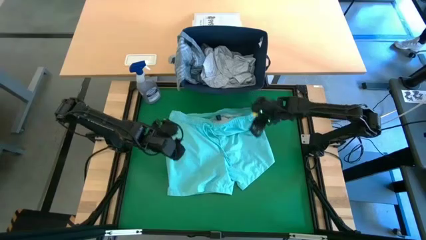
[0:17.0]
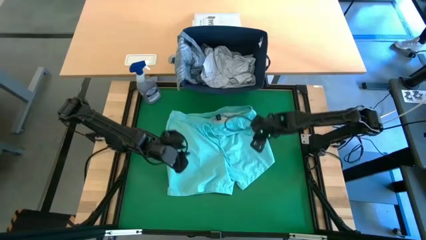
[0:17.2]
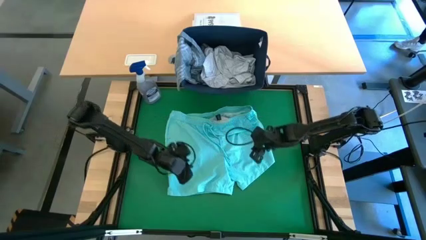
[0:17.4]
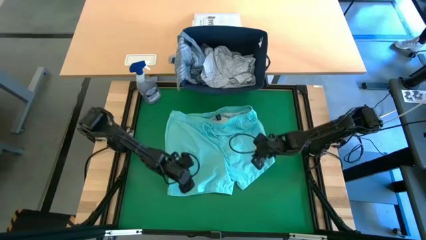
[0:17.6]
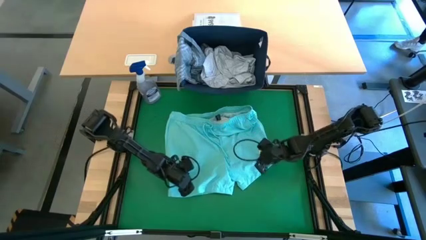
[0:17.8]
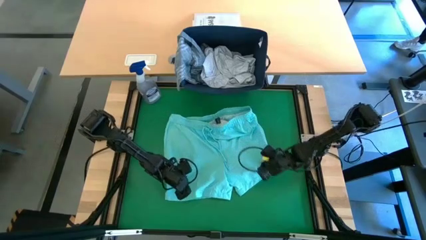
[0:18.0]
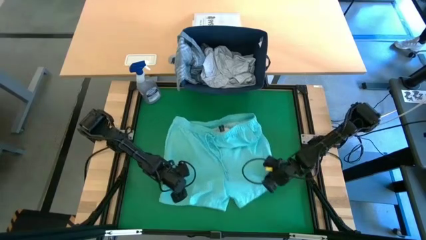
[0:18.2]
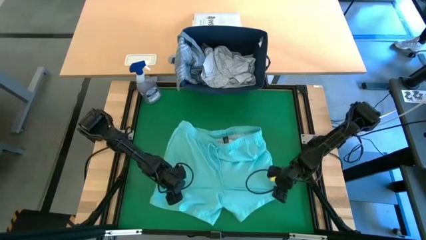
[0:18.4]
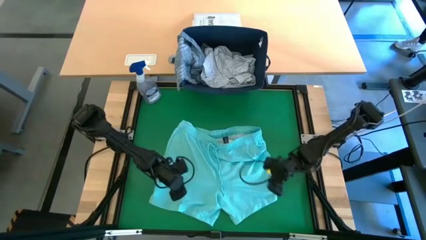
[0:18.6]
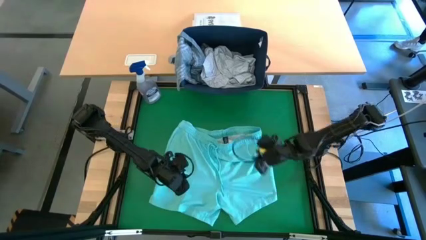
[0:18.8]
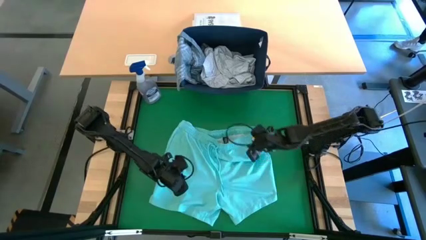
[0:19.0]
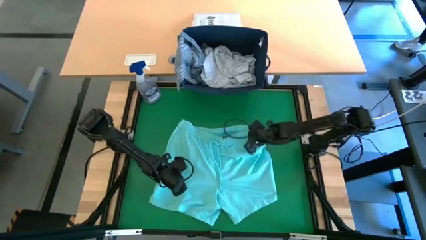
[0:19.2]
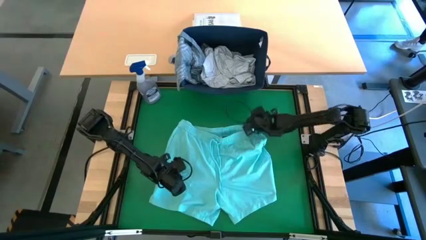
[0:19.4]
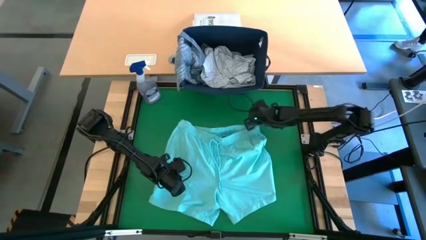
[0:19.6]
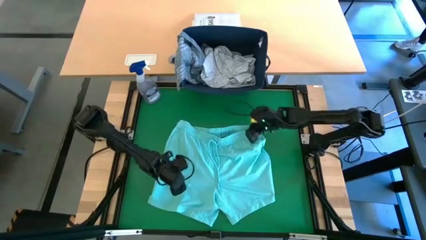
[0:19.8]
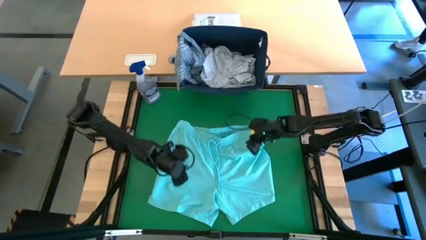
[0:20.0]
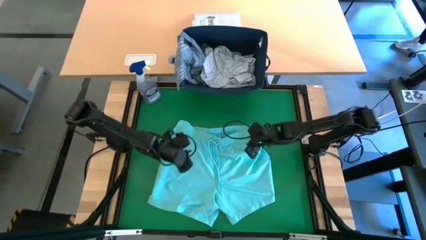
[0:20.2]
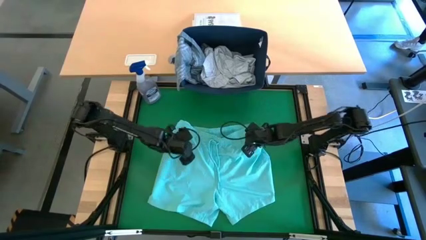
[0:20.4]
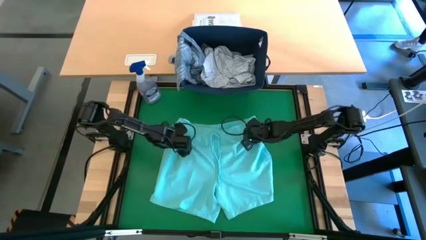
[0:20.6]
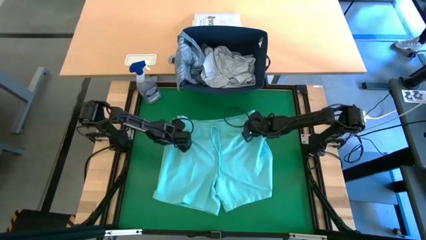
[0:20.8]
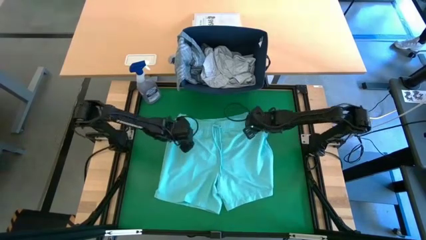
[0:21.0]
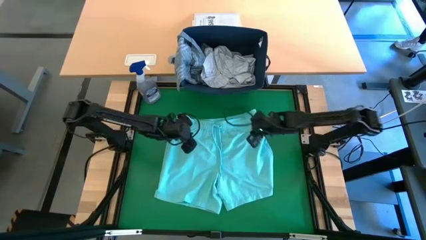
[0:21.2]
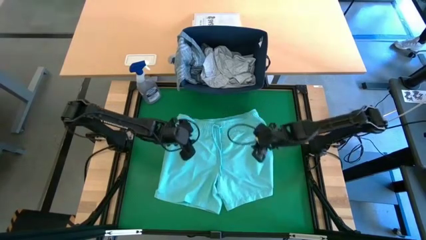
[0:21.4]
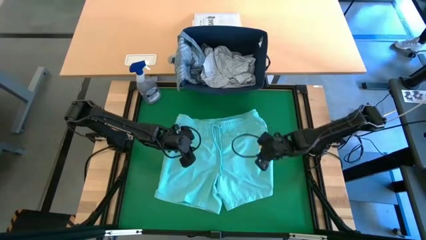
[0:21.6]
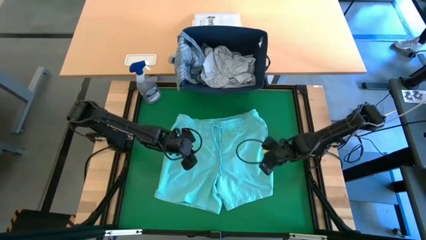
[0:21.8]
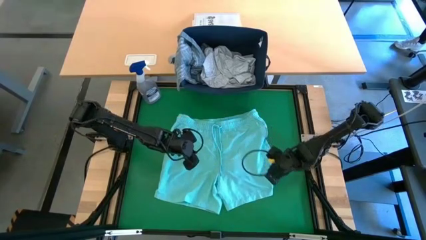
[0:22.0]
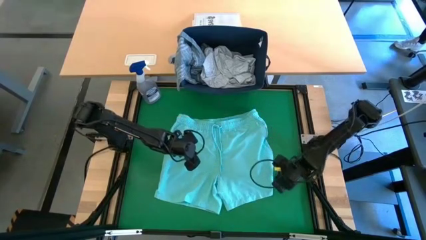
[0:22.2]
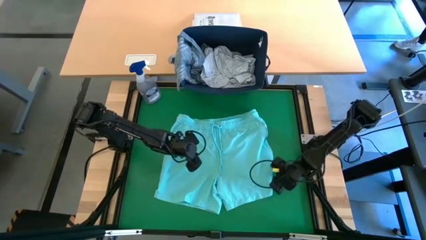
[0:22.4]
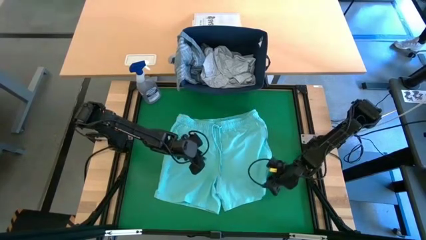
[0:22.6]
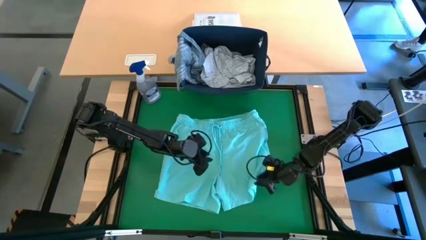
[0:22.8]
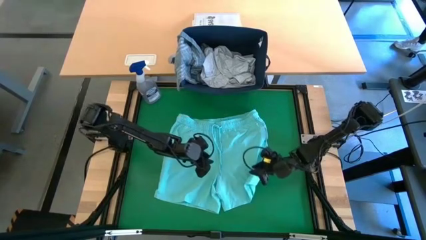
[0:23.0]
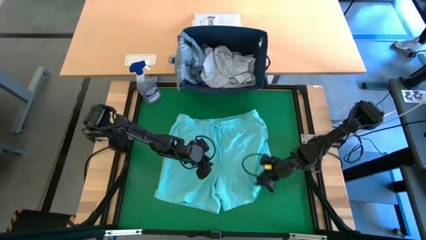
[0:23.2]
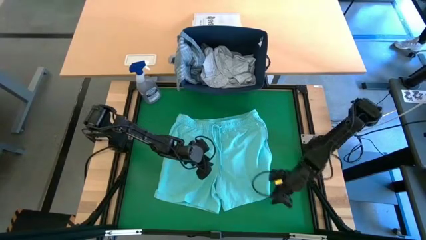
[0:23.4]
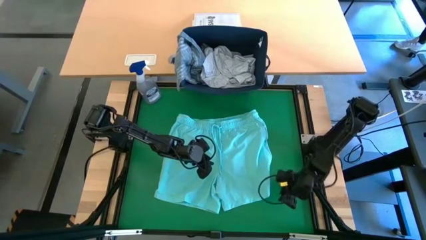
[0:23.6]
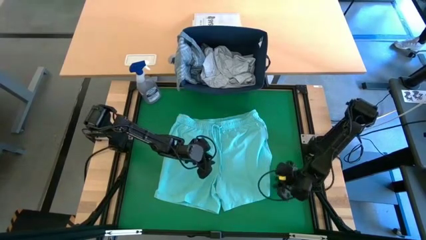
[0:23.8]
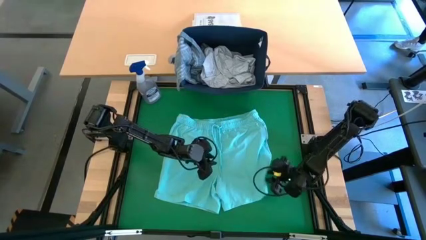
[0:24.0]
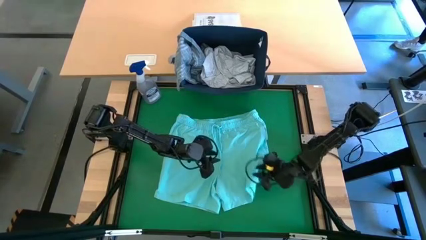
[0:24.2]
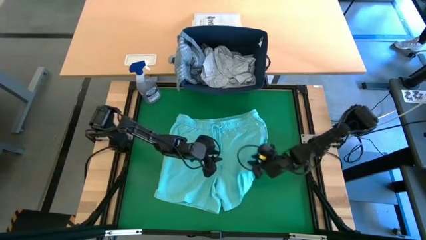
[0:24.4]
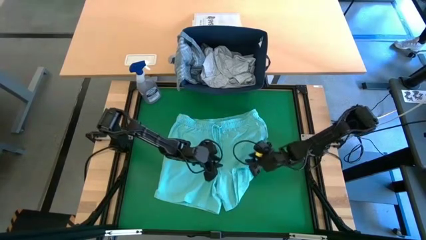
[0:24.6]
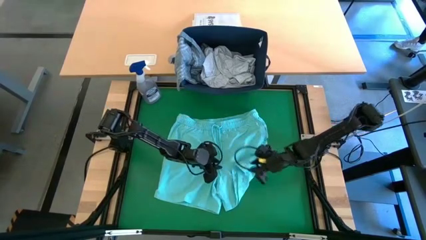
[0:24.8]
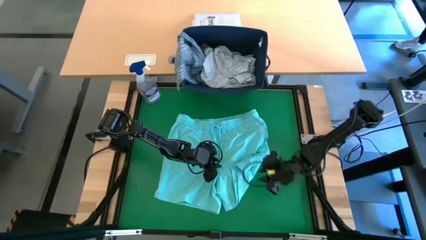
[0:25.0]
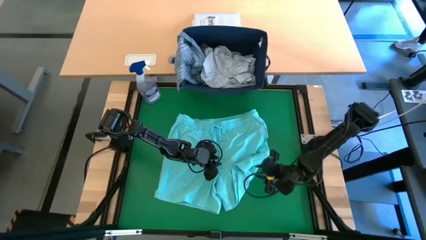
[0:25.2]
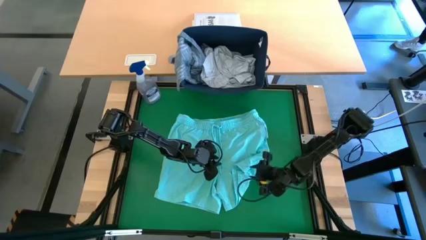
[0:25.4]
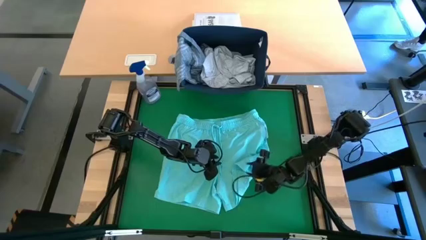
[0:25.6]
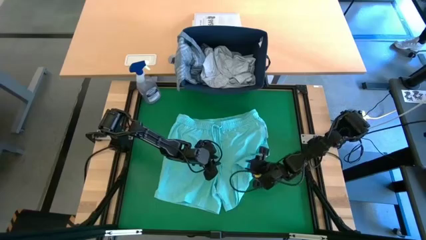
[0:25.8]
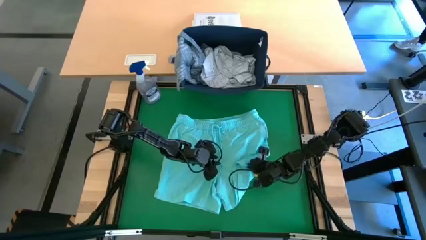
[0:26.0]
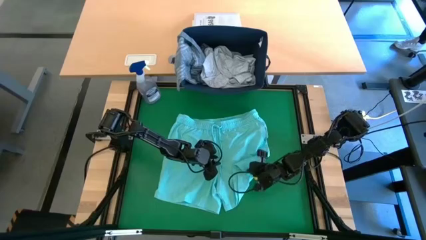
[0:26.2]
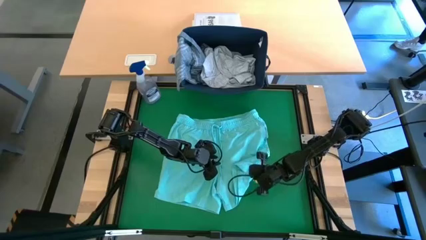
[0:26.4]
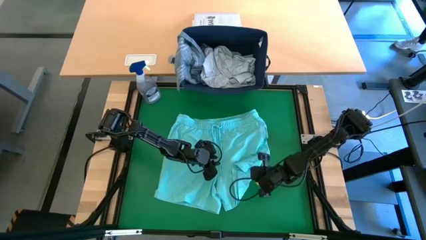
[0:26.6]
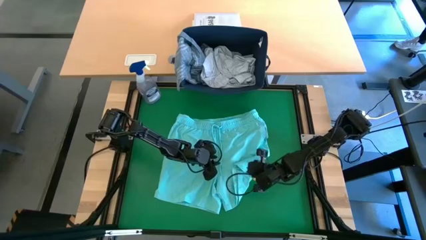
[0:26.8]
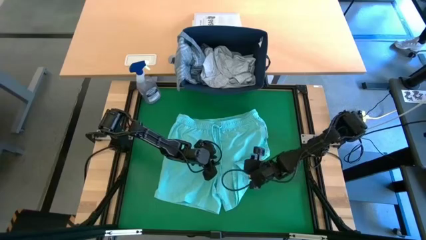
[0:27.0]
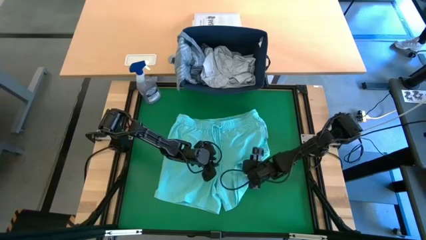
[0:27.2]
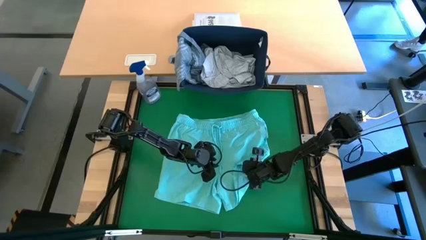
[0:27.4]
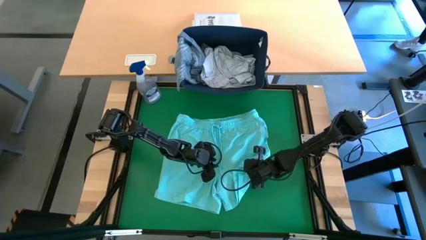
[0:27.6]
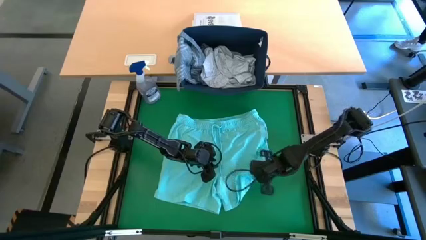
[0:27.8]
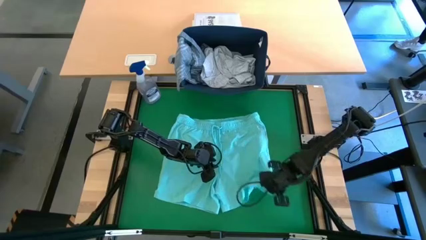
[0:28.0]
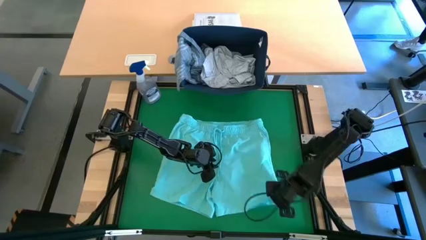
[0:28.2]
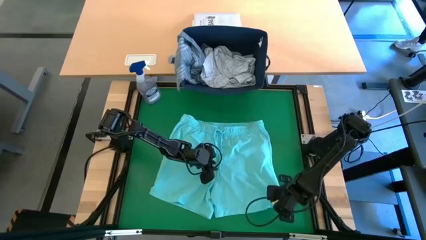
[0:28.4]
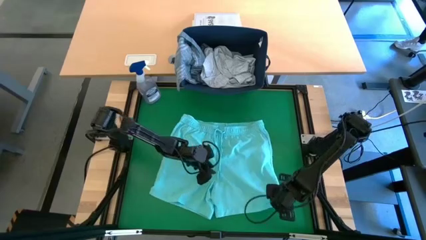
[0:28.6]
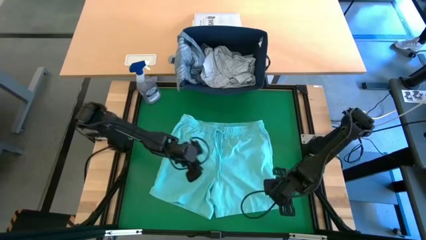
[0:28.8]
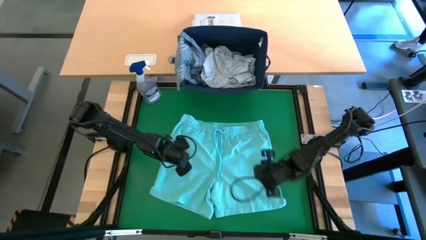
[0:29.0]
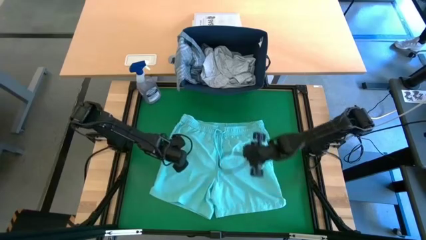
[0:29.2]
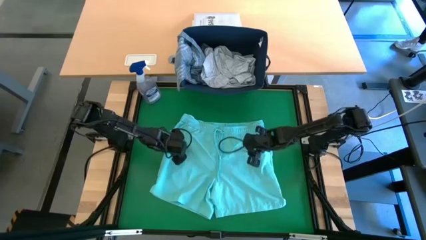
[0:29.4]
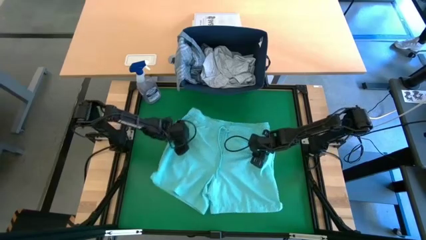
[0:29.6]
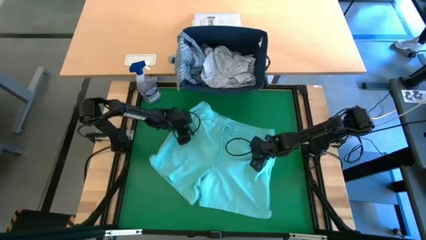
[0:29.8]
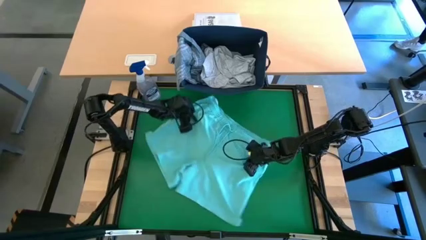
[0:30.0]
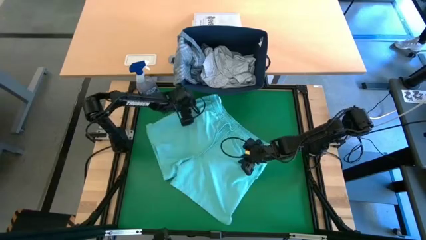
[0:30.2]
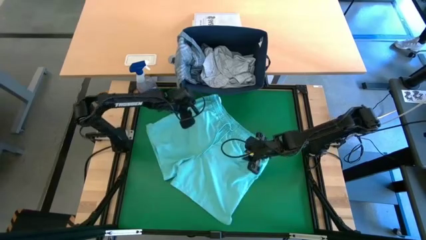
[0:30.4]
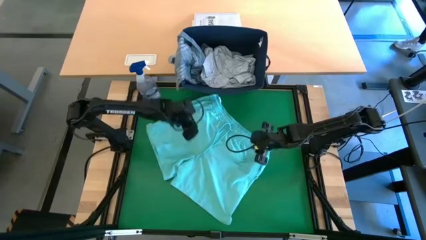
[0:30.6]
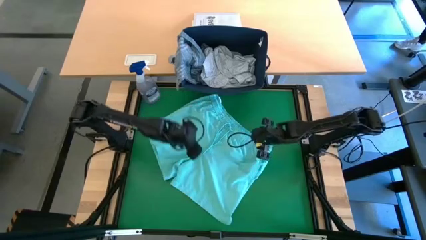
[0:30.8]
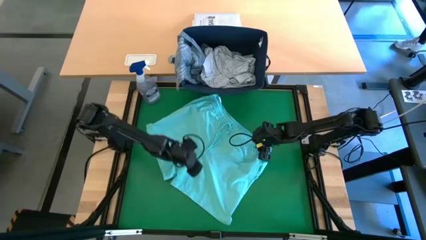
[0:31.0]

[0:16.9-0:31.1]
Task: Fold laundry
Fold the blue short

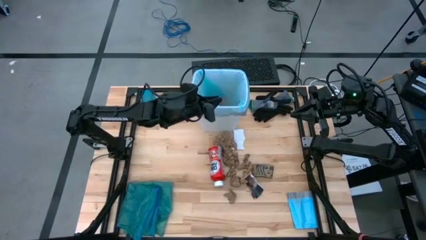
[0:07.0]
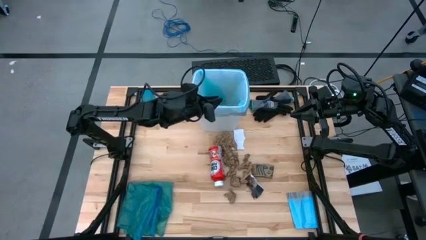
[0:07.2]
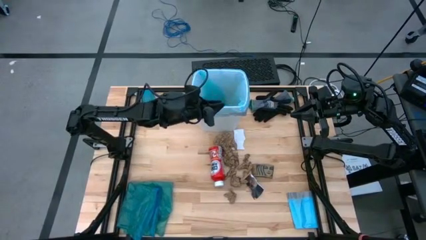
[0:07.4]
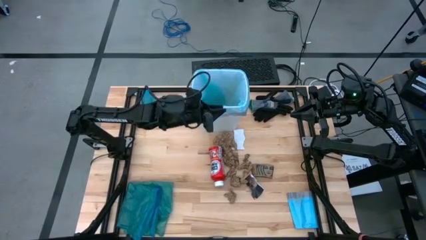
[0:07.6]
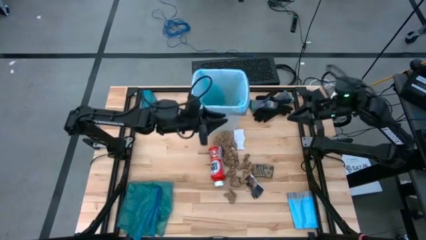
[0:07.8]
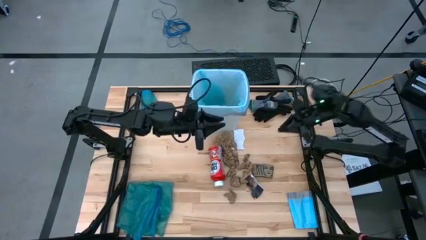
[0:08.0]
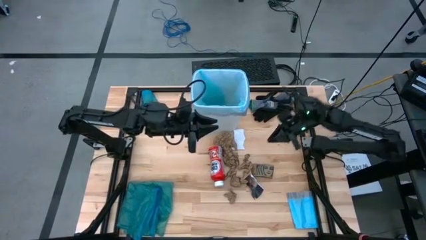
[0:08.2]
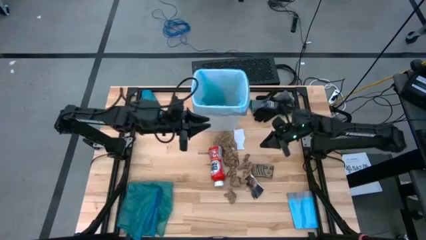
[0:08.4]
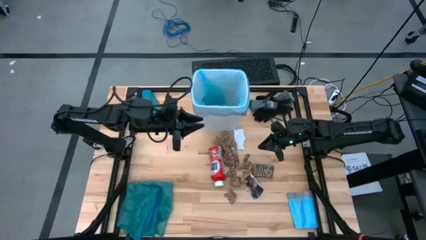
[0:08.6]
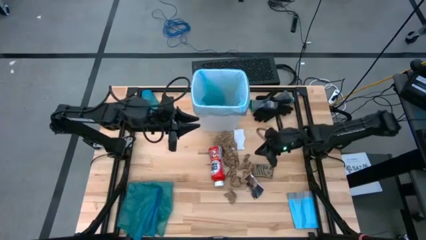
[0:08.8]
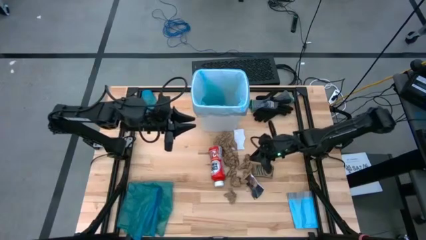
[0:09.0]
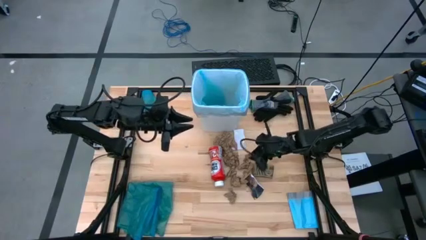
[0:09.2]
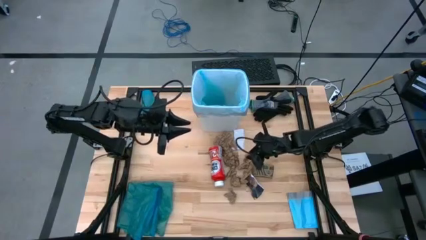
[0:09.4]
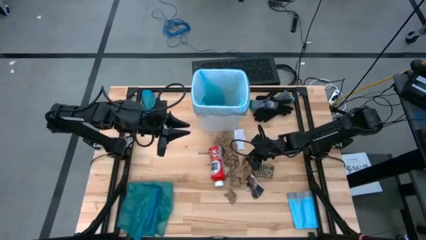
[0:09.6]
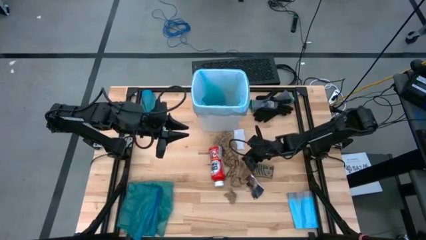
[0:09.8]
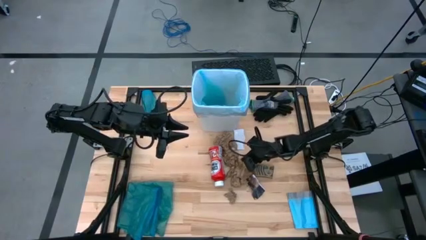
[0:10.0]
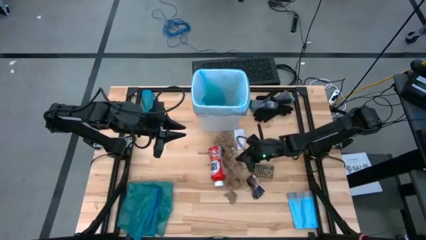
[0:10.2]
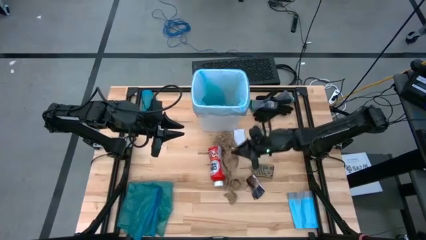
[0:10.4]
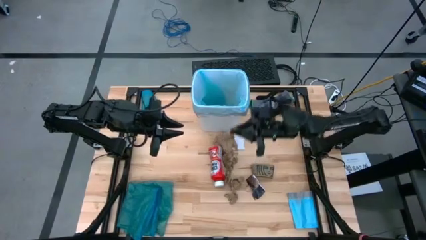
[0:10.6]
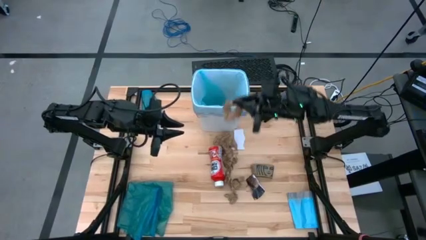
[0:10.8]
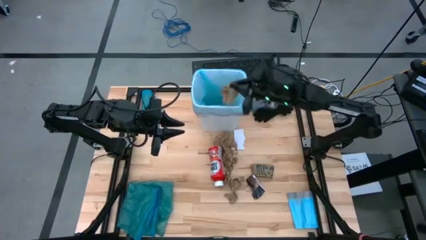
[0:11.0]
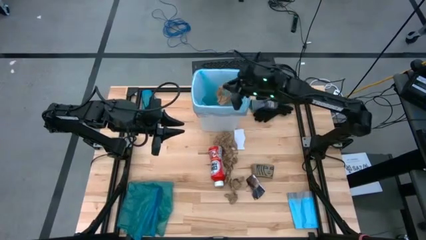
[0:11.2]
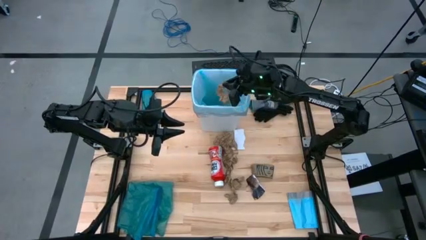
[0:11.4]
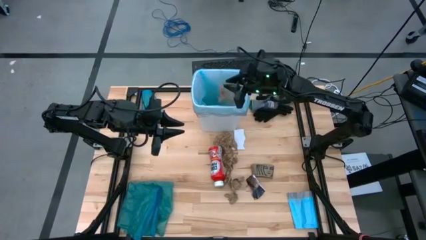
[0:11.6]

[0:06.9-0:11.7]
Task: place trash/remove bag and relplace
Put the brown paper into the white trash bin
